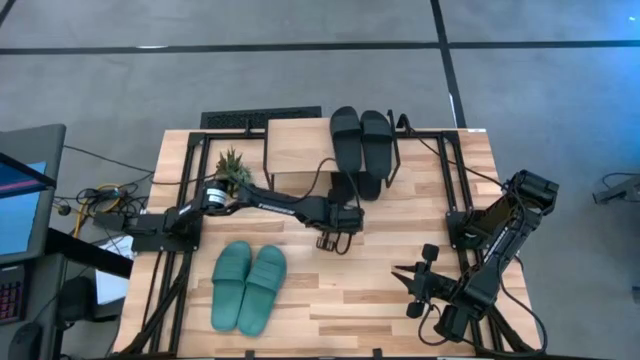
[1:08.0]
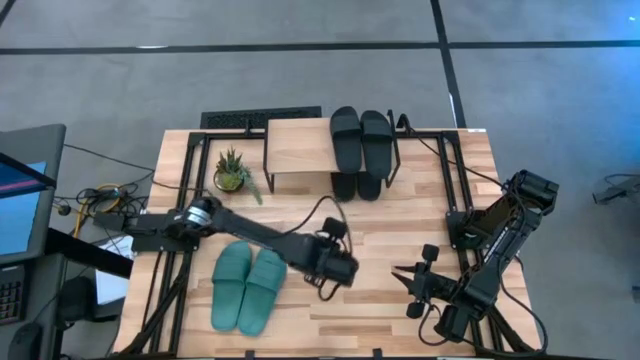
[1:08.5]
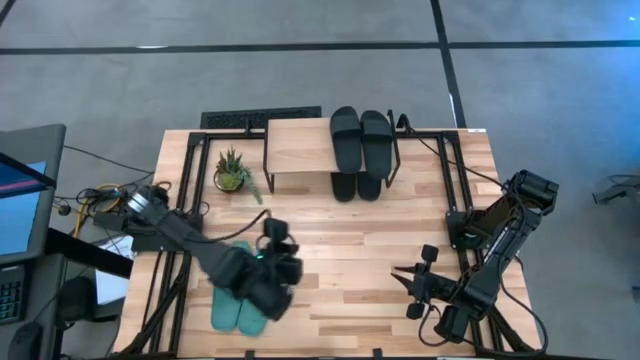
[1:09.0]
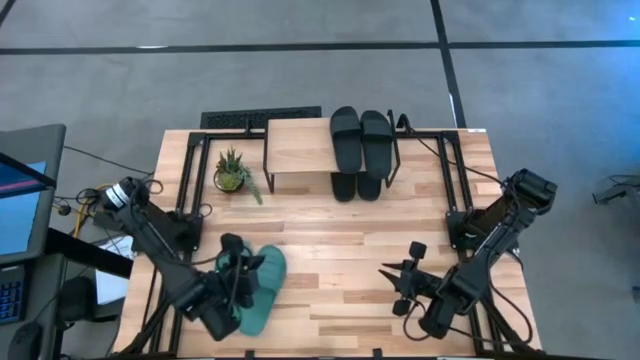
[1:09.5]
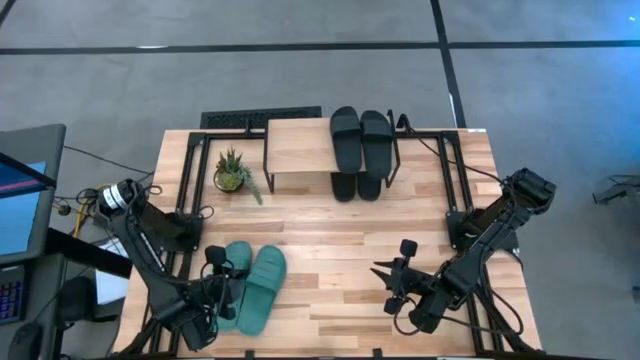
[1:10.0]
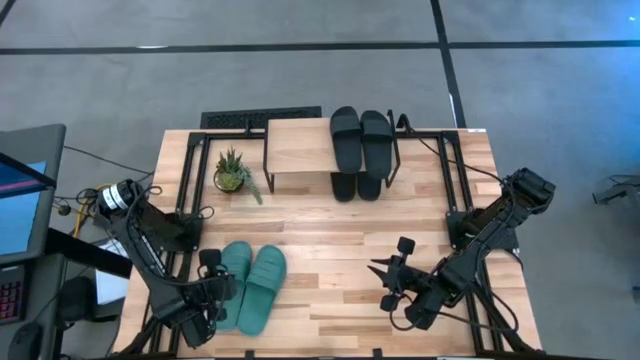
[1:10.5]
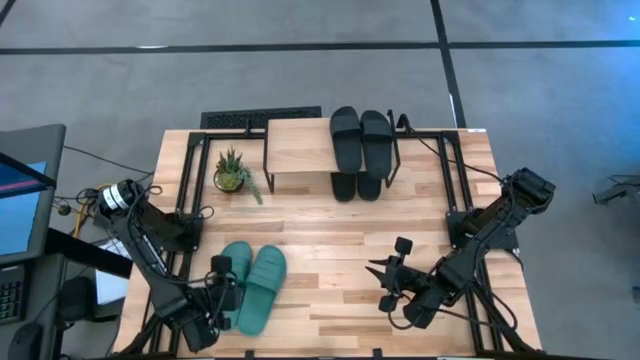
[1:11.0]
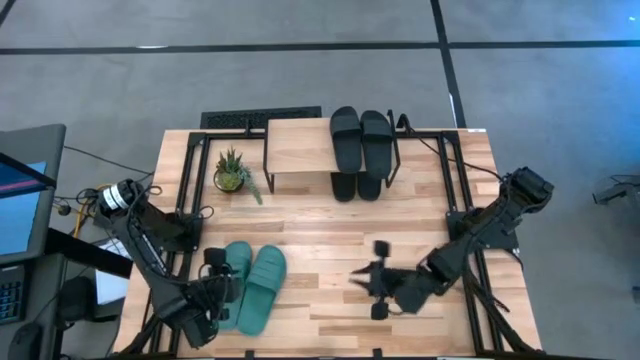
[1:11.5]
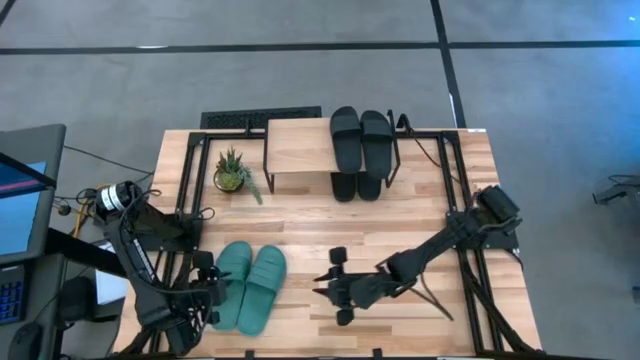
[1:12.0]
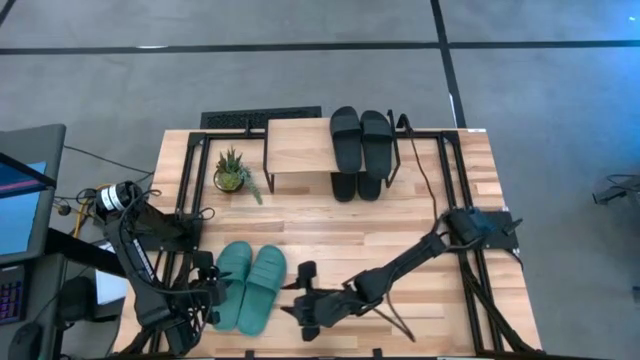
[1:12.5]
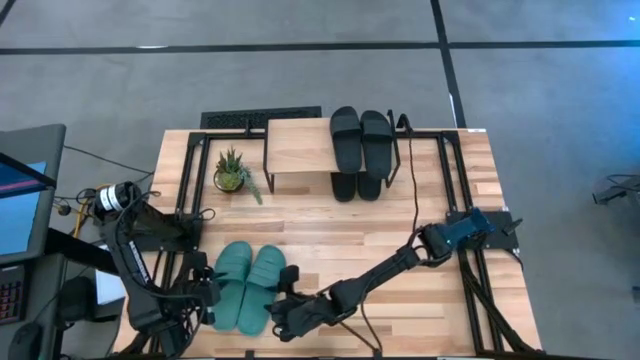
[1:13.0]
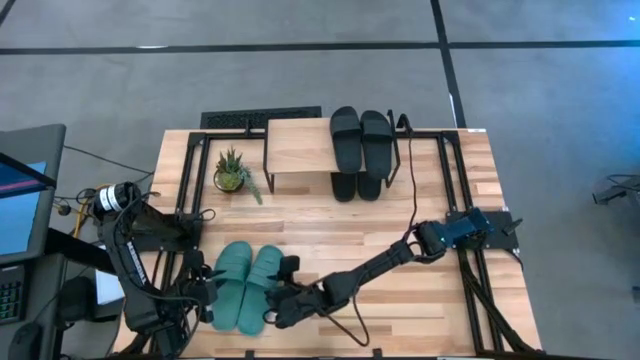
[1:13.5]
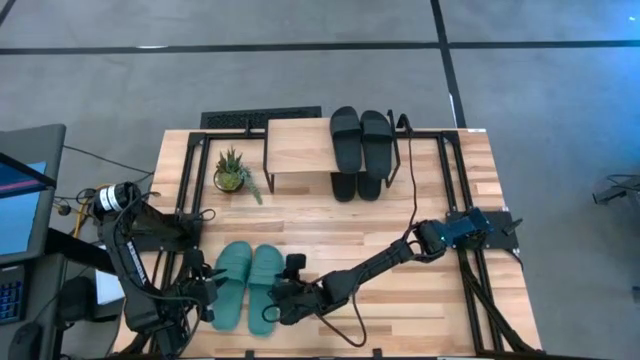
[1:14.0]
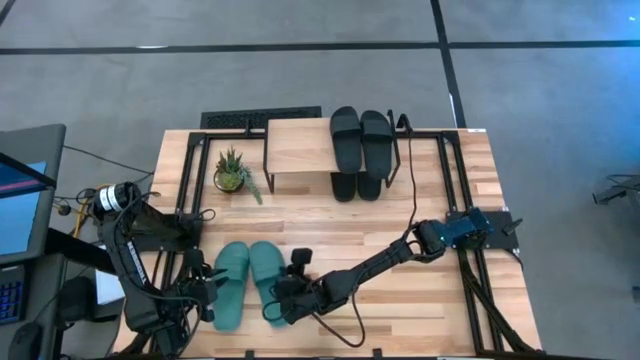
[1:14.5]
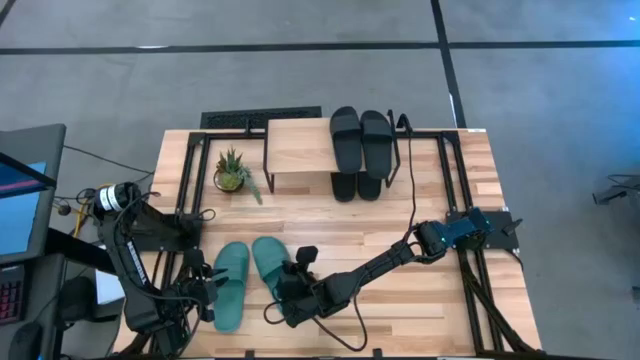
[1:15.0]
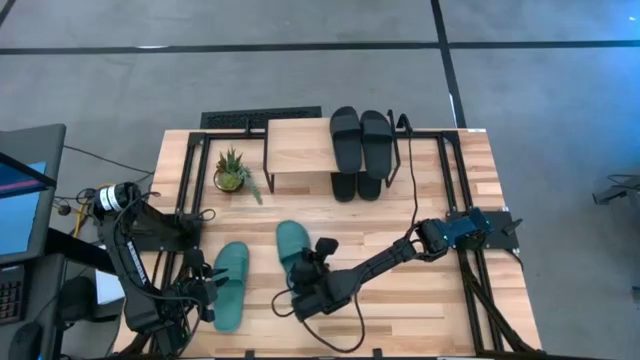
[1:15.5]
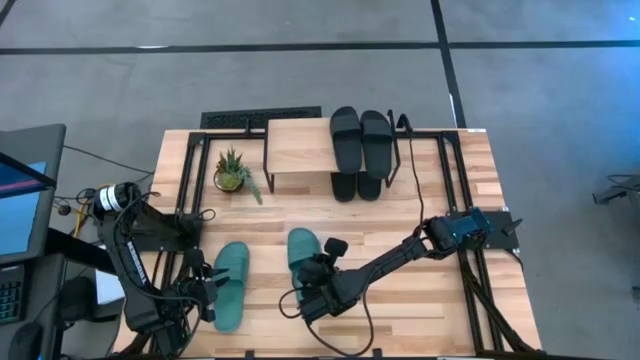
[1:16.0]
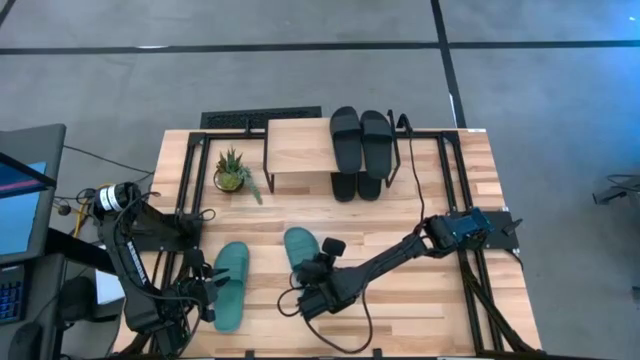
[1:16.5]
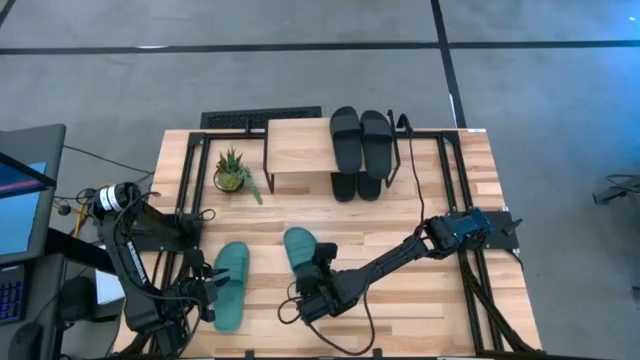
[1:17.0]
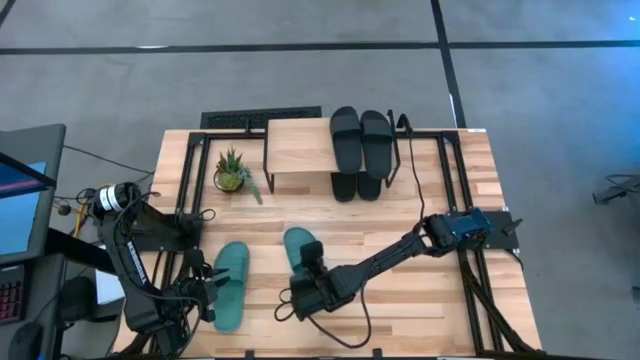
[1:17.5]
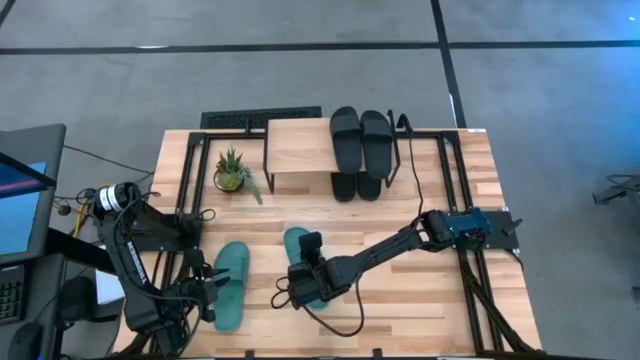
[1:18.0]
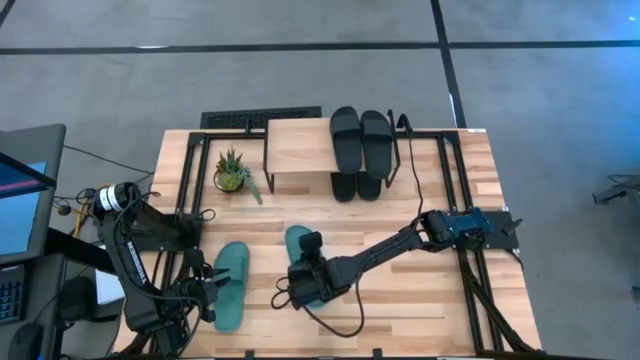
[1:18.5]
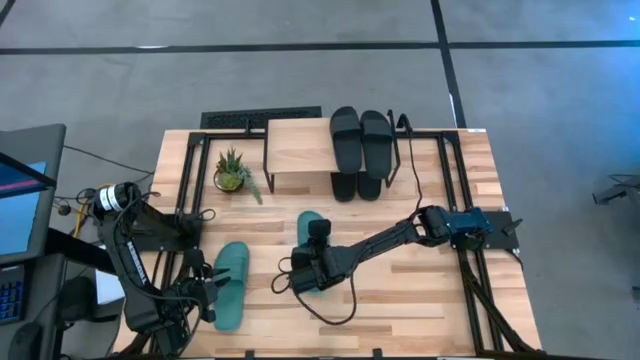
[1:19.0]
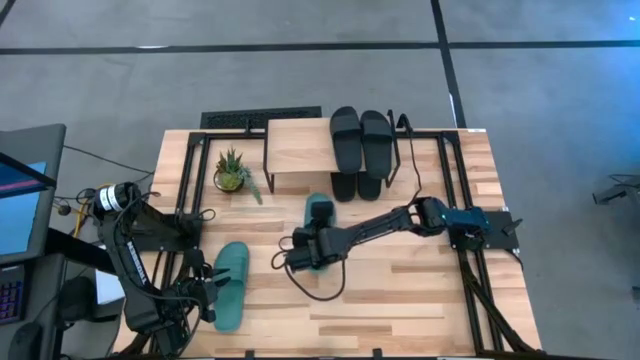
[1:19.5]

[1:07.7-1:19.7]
Task: Pick and place slides into the shelf
Put the green slipper on the shelf

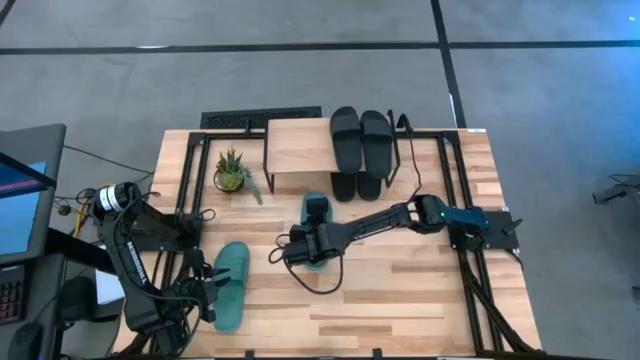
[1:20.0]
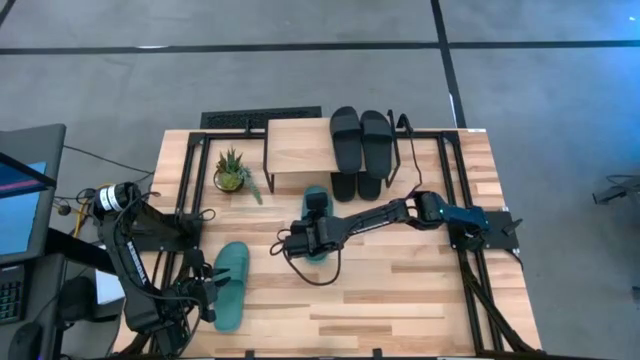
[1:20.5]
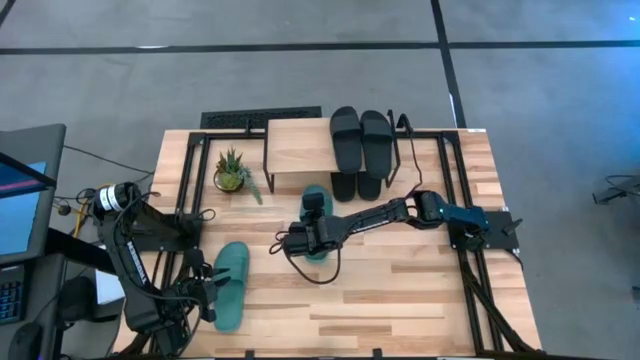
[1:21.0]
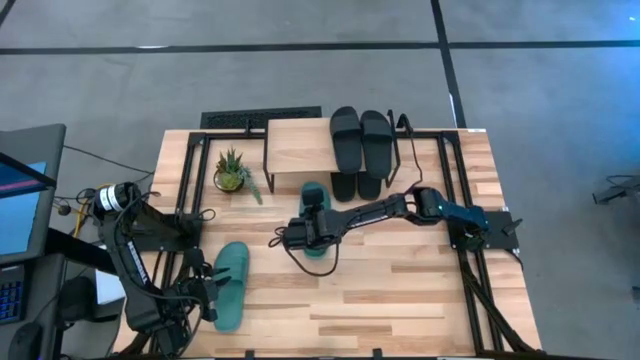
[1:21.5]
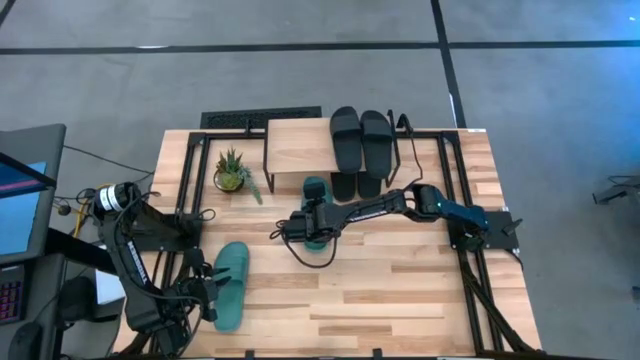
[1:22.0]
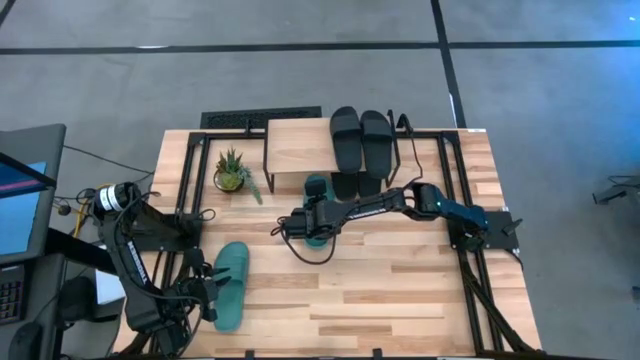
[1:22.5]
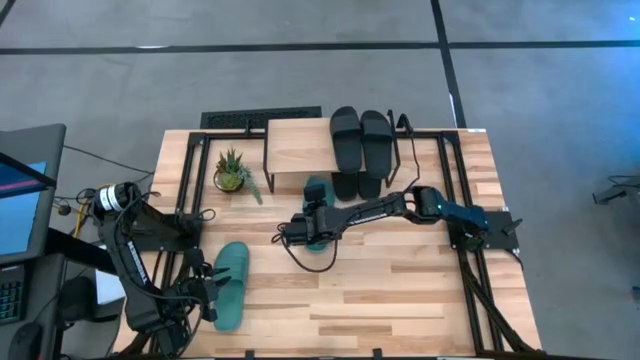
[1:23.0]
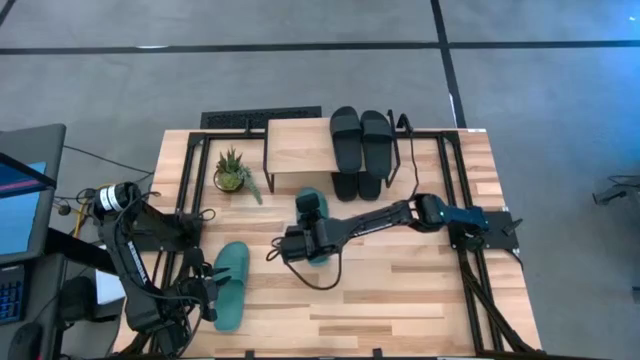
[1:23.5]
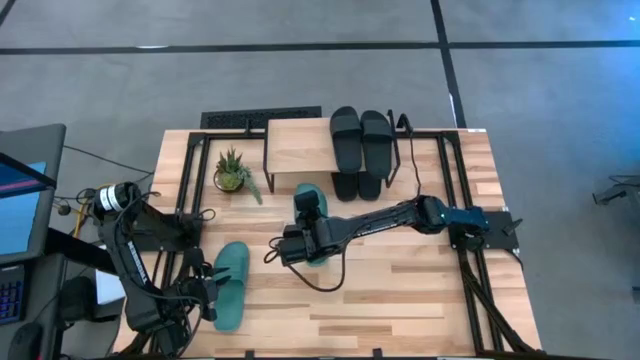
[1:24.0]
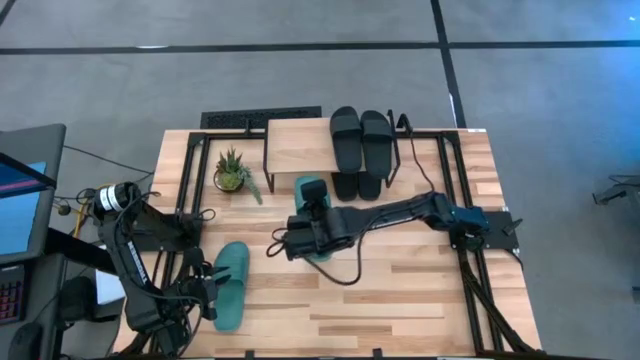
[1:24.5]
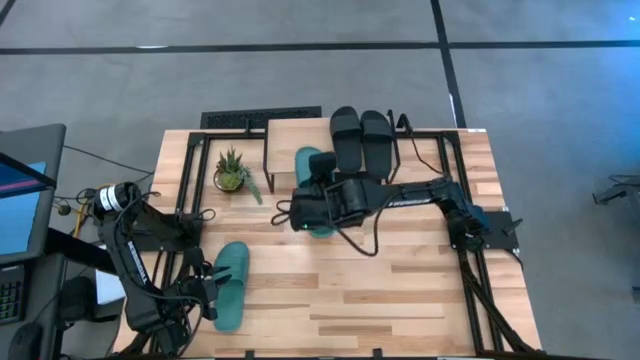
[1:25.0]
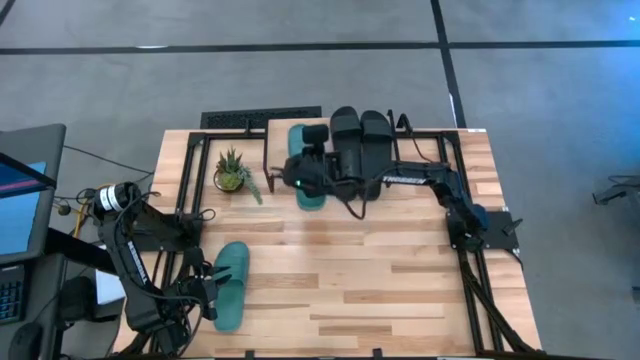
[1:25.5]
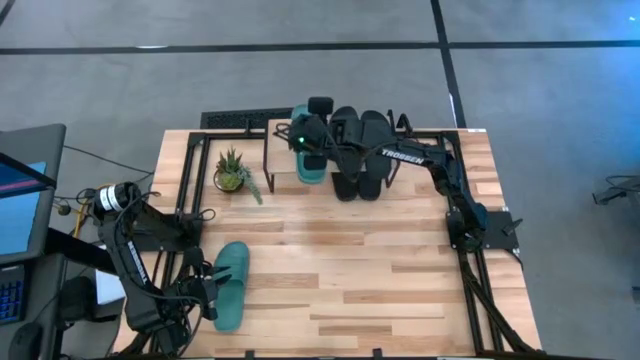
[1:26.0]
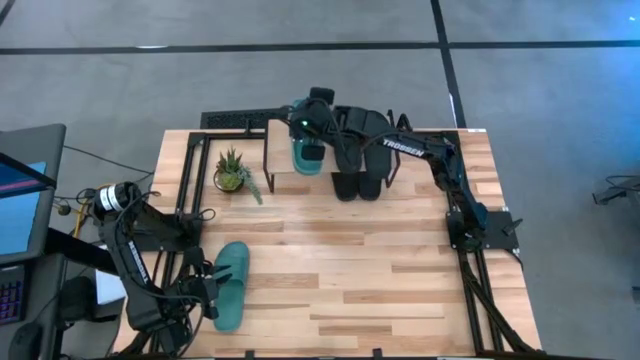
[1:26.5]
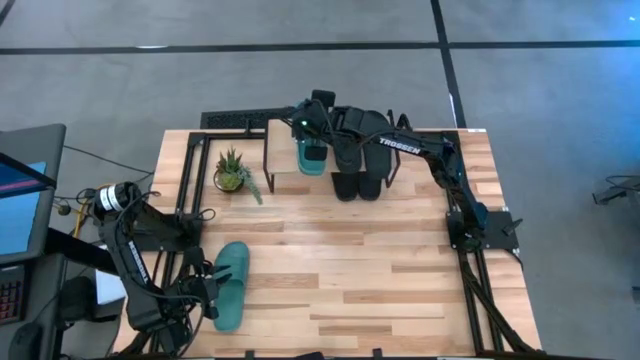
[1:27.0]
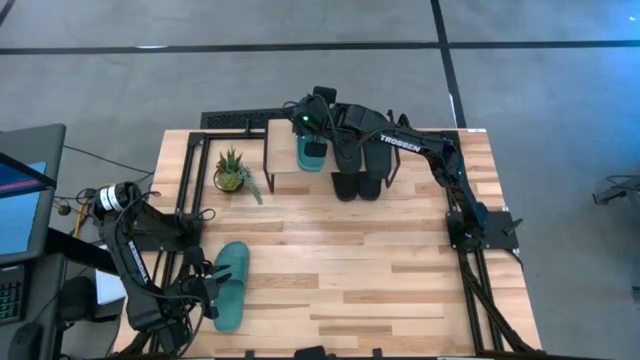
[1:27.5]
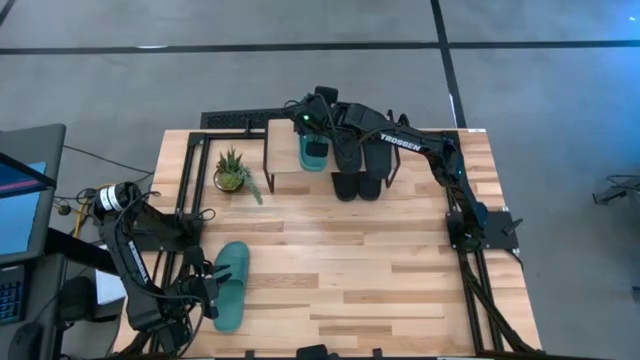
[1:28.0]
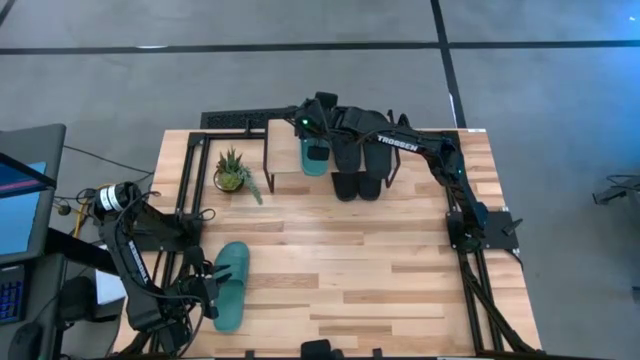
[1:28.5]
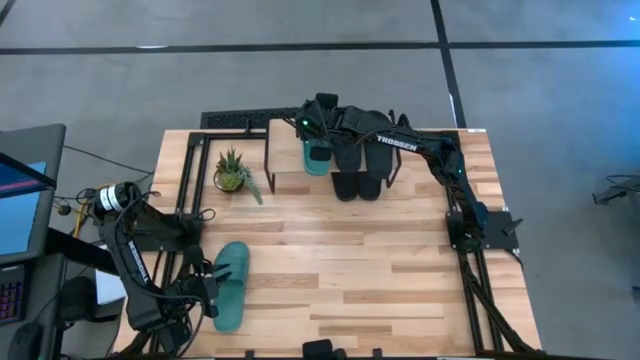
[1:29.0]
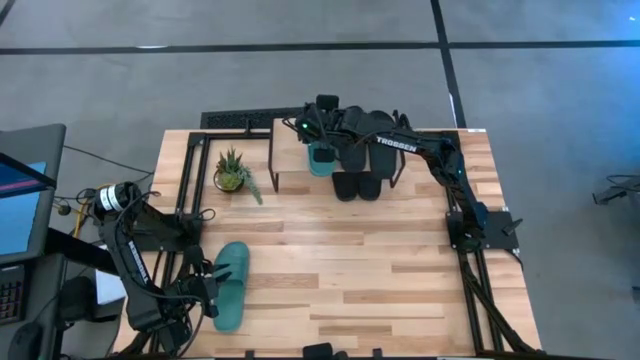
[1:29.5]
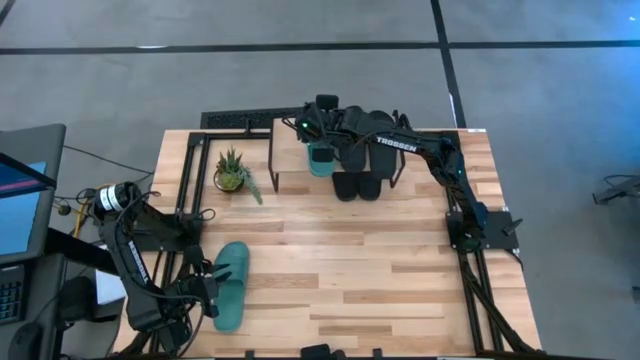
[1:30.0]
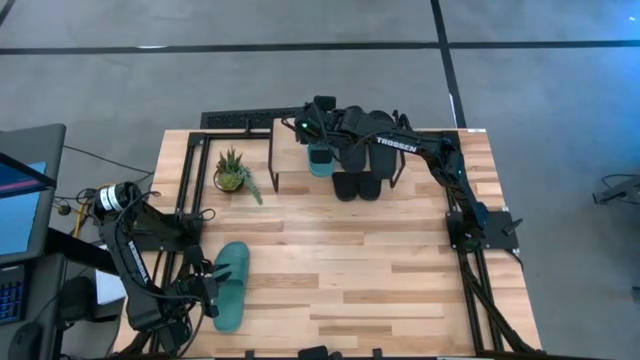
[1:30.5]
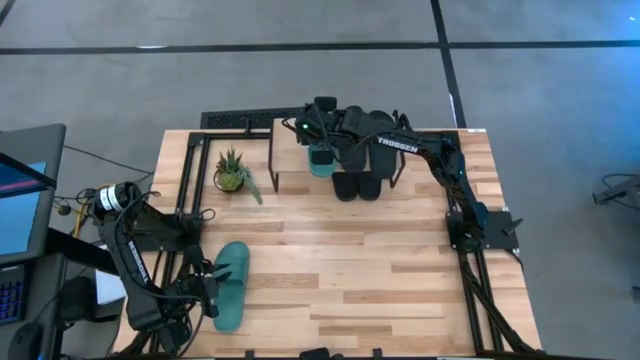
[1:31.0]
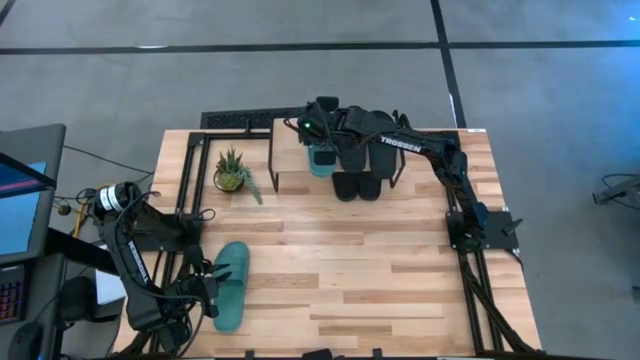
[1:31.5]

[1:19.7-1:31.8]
Put the green slipper on the shelf
